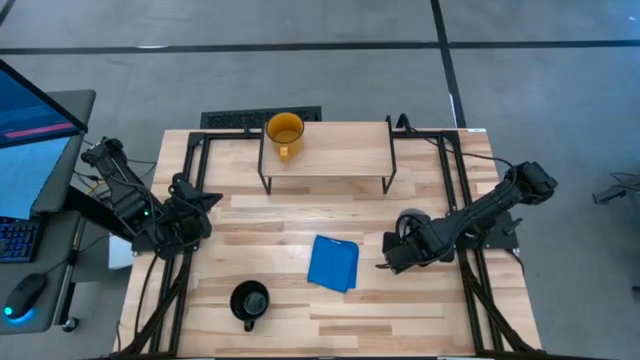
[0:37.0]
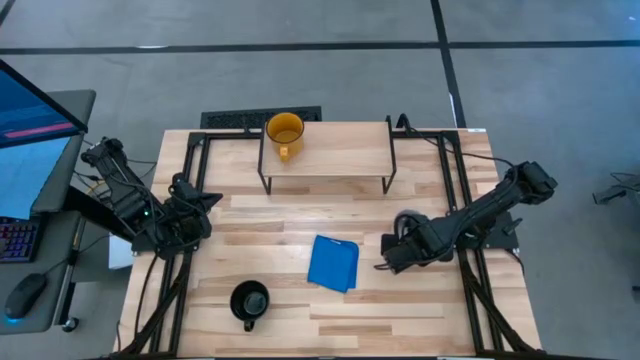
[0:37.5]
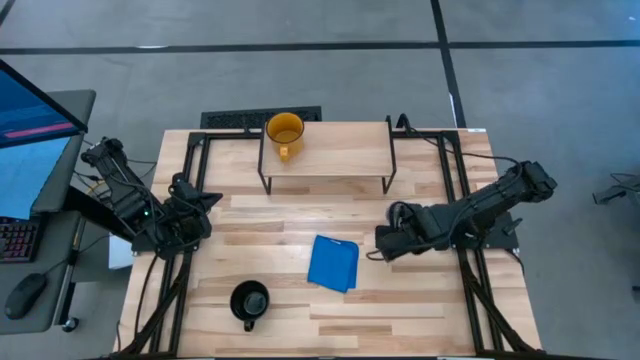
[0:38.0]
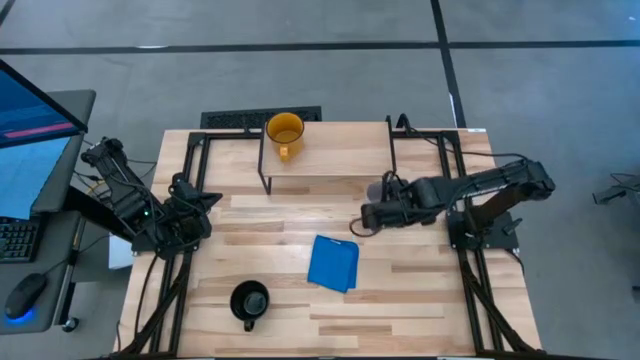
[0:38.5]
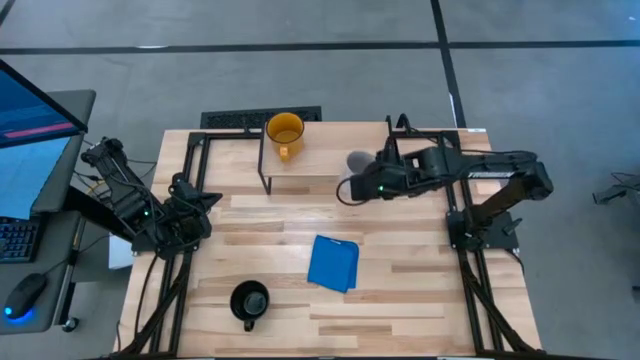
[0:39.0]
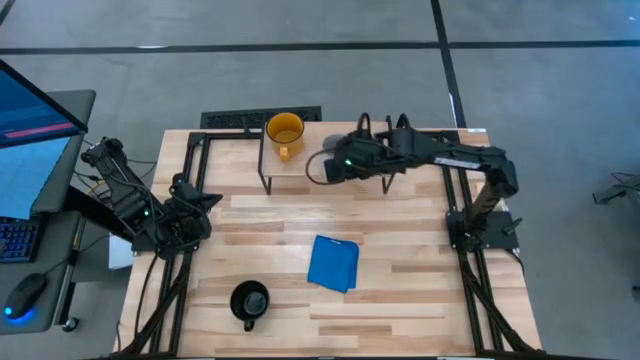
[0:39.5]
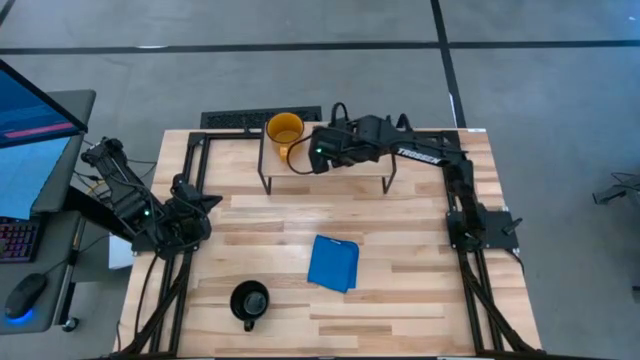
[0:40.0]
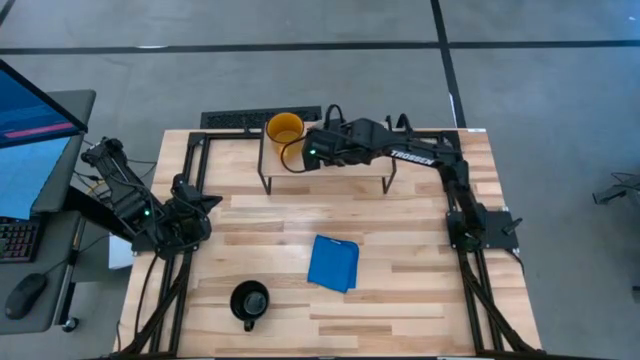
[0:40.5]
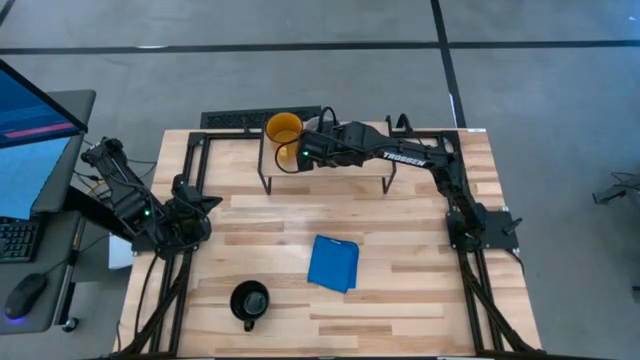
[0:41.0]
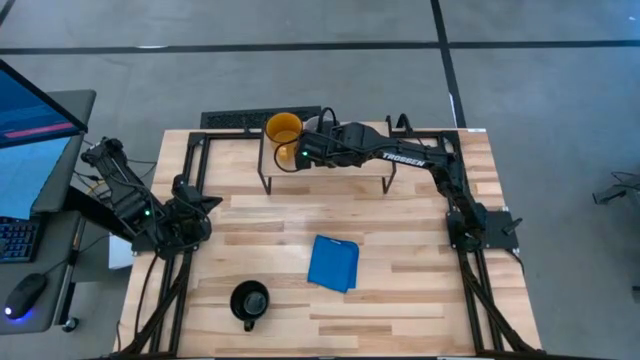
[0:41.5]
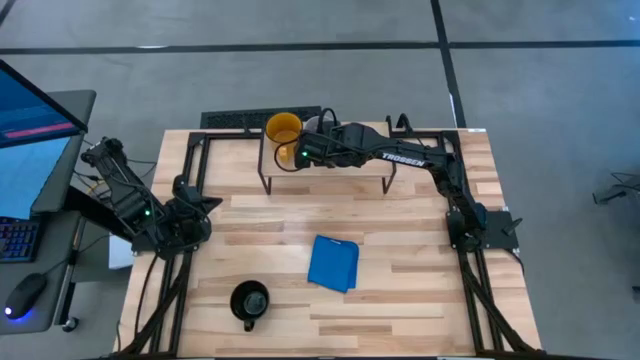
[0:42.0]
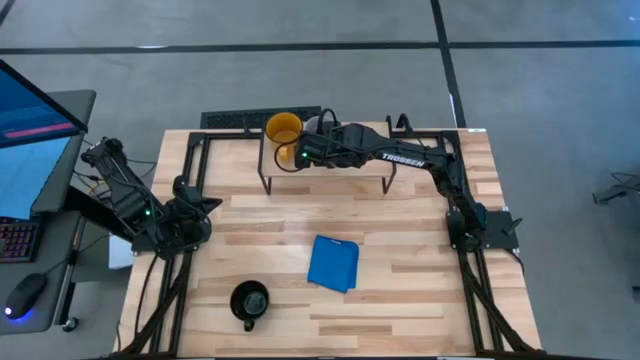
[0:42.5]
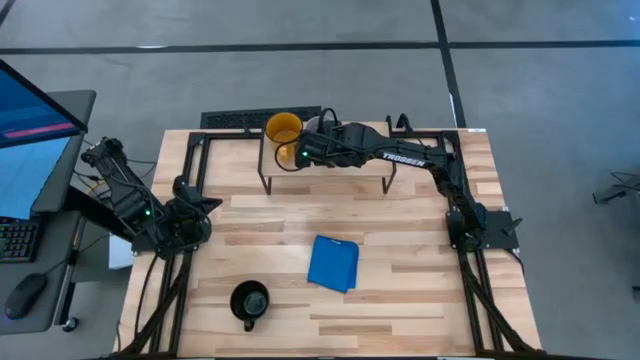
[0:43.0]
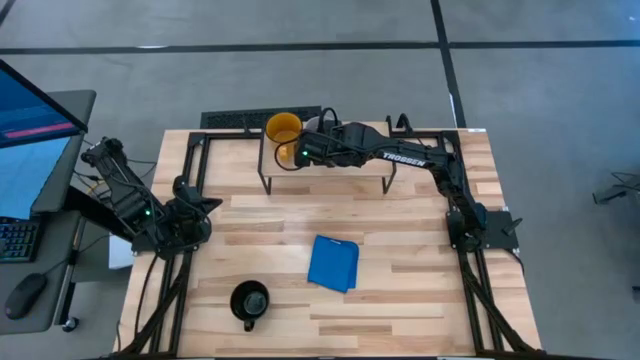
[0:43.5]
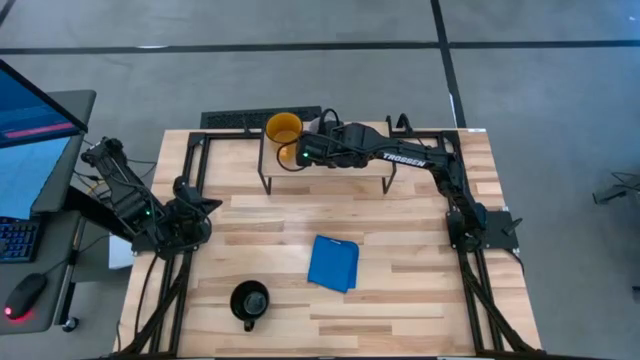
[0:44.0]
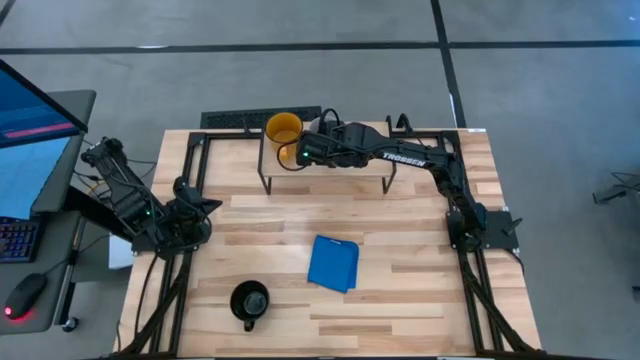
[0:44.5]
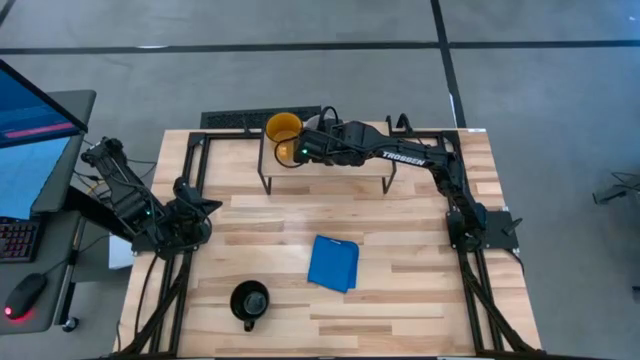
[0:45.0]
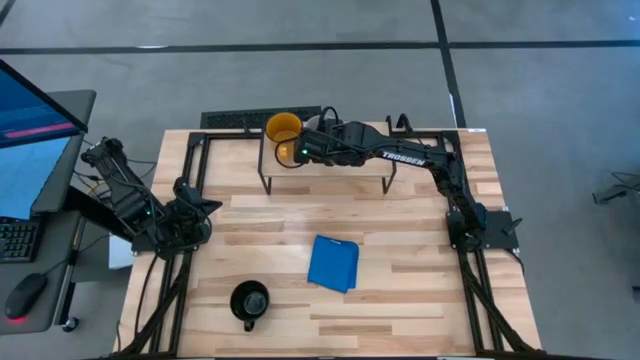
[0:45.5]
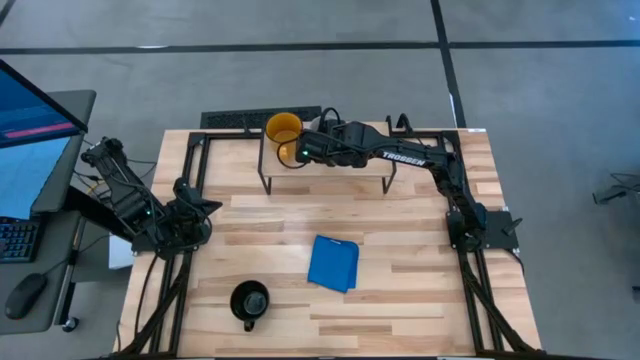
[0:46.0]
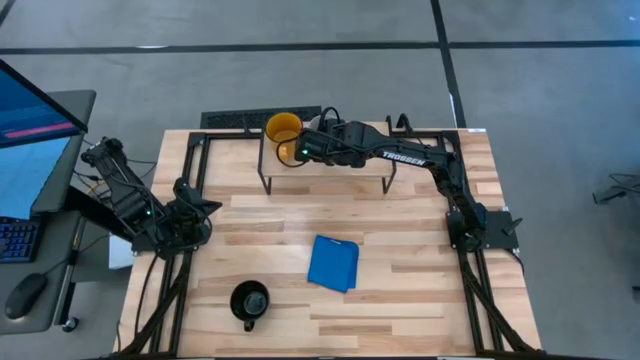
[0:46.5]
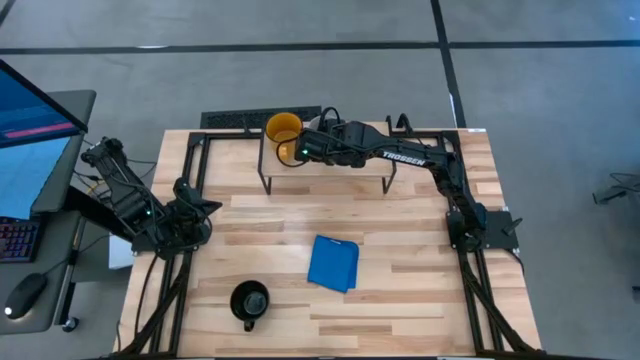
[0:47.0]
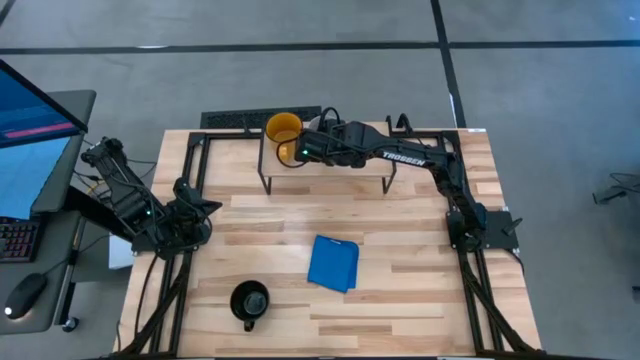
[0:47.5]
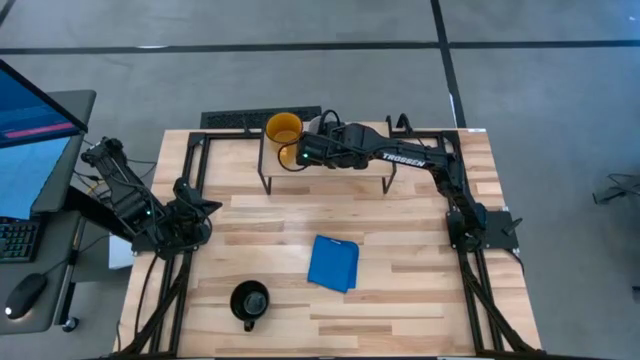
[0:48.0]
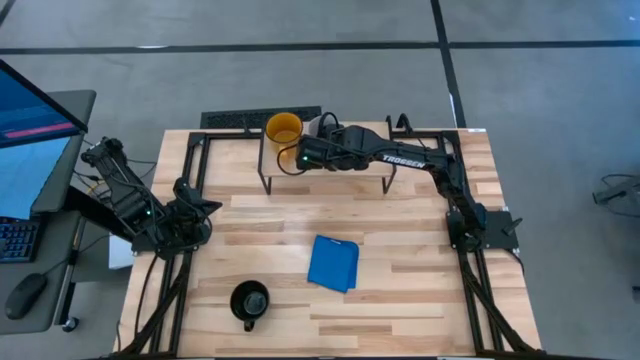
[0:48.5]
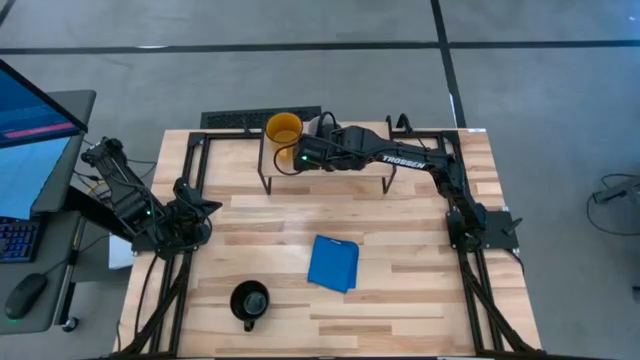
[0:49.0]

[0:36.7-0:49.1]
Task: Stack small to large cups/mugs on shelf
Put the white mug on the shelf

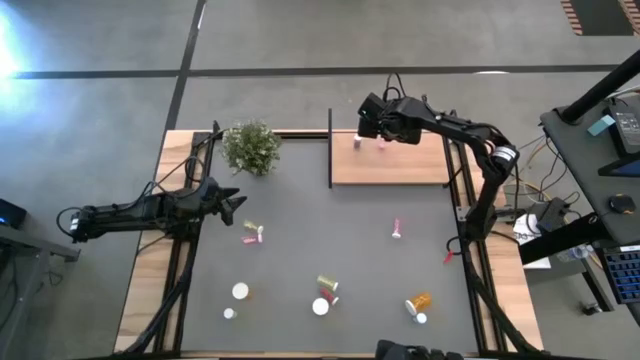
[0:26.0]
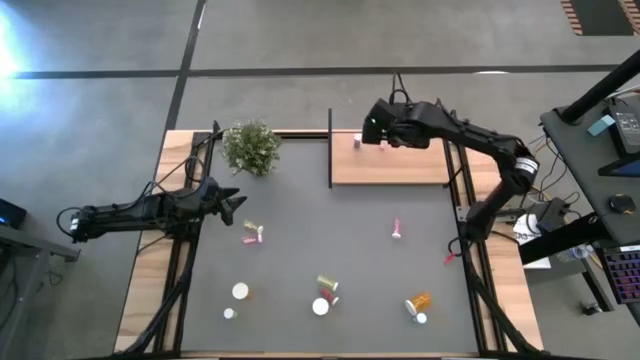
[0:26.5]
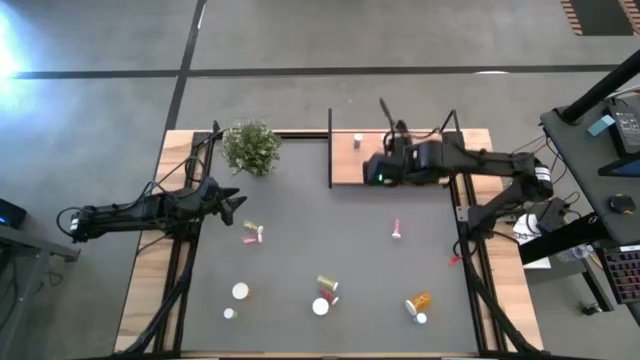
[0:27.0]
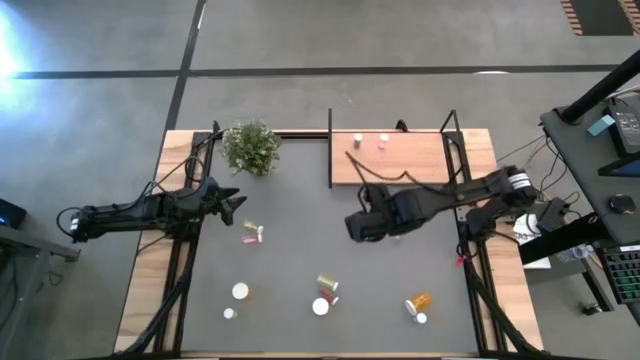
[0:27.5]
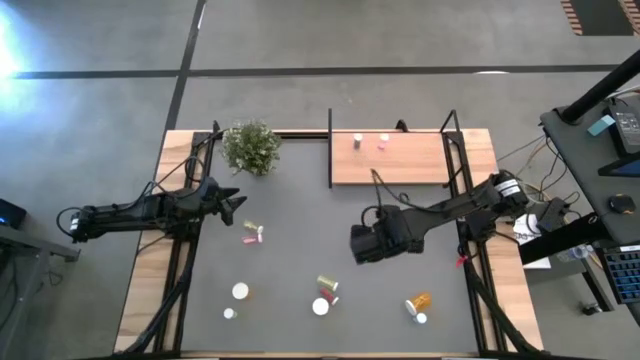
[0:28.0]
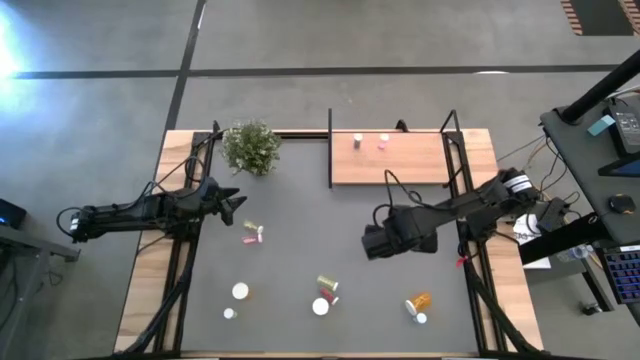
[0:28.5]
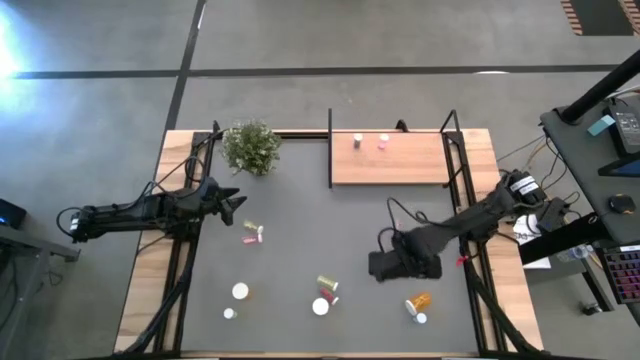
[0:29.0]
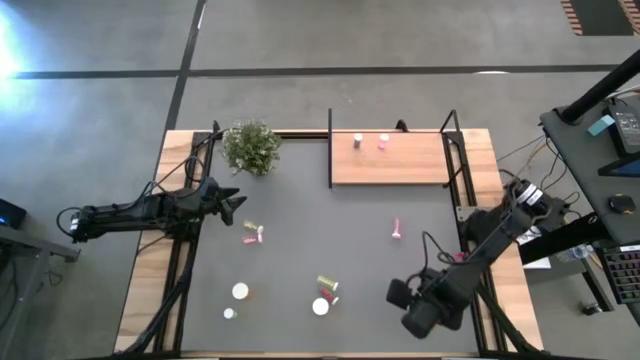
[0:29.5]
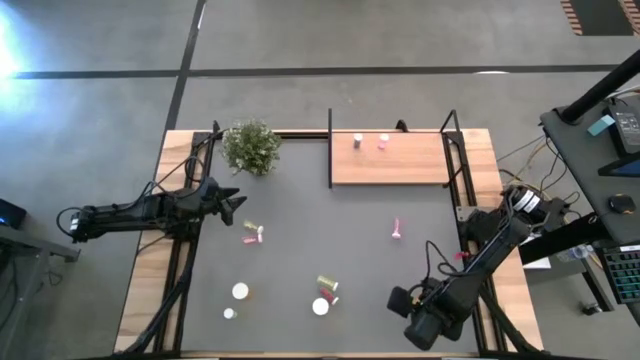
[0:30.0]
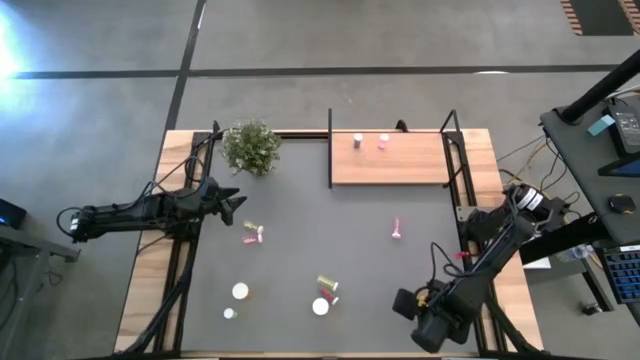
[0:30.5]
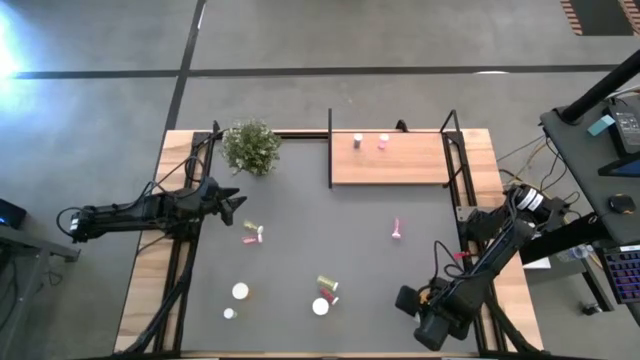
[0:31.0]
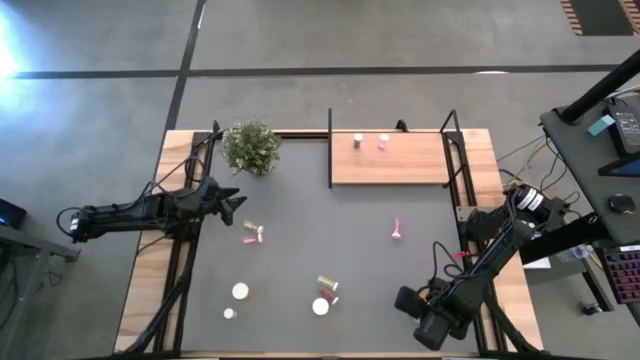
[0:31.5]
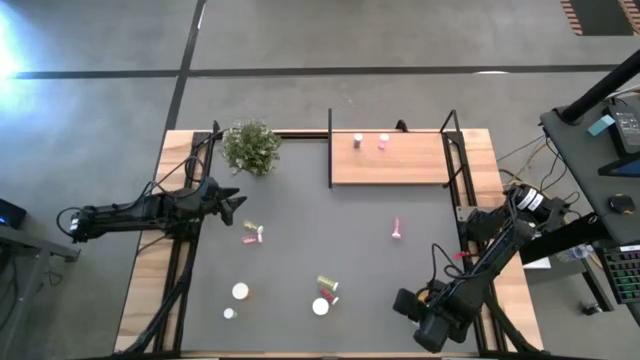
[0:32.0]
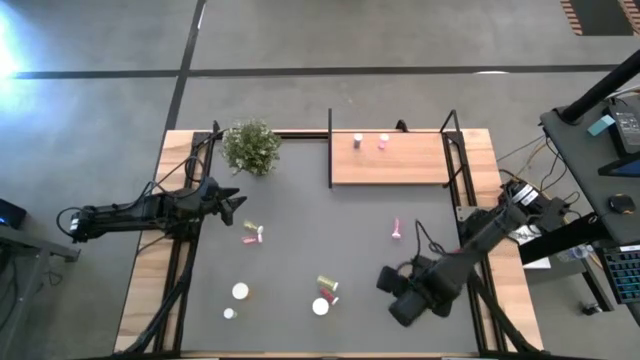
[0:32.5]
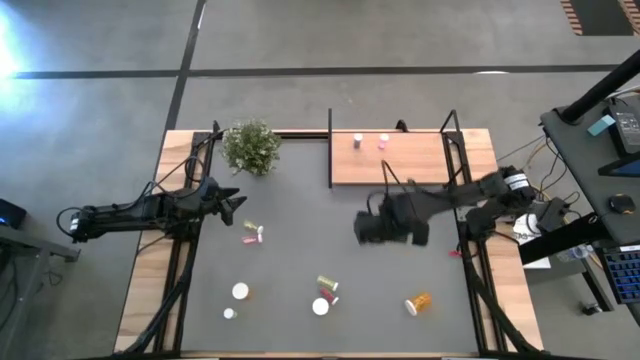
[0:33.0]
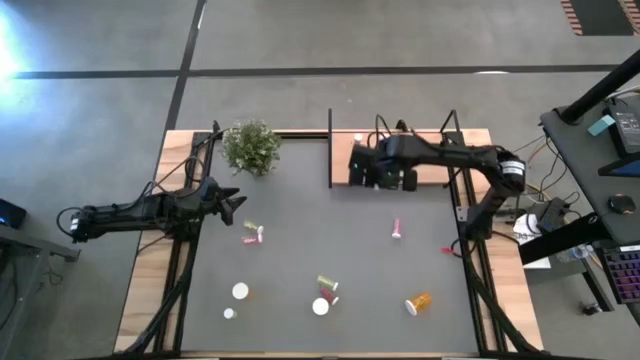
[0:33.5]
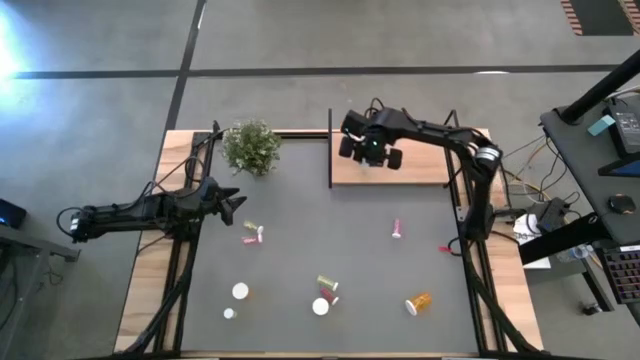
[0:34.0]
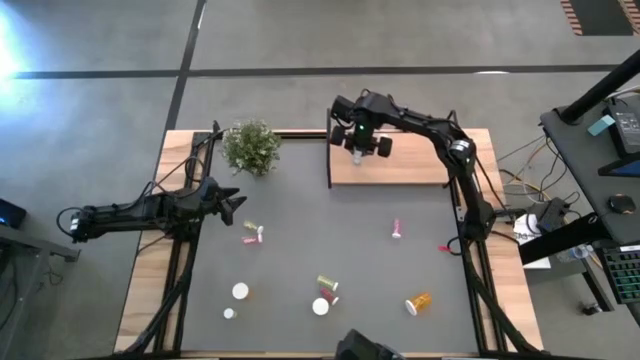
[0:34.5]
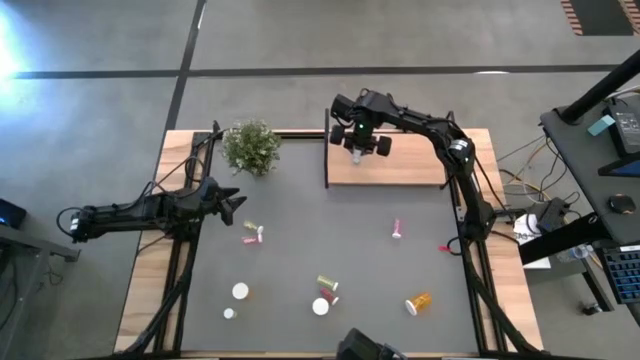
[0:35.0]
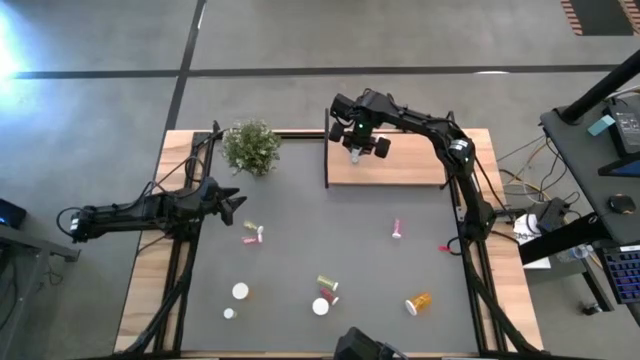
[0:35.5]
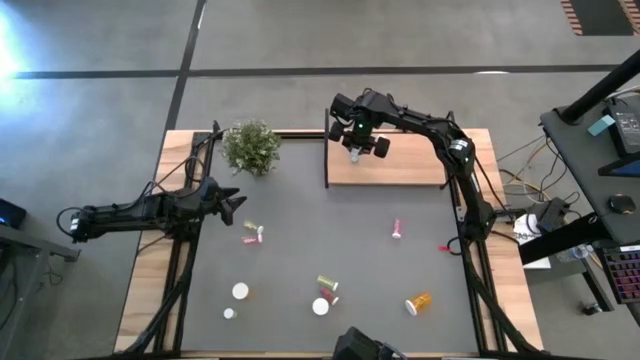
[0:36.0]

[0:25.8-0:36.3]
Task: Pick and place medicine bottles onto shelf by color
Put the right blue pill bottle on the shelf aligned with the other blue pill bottle
